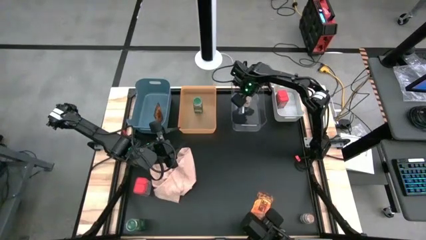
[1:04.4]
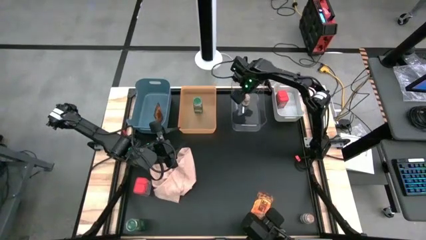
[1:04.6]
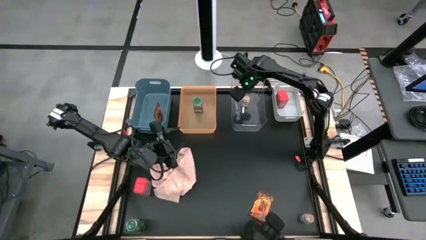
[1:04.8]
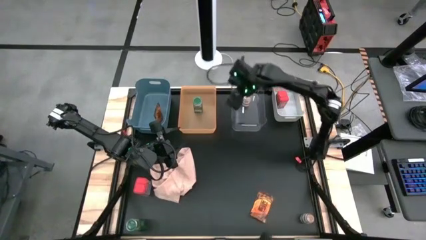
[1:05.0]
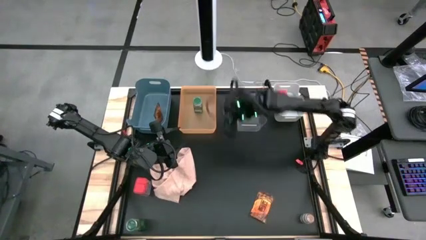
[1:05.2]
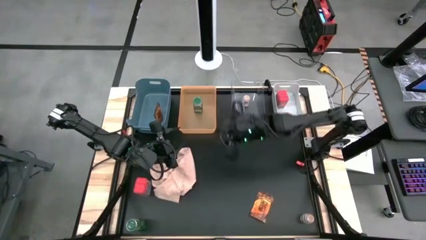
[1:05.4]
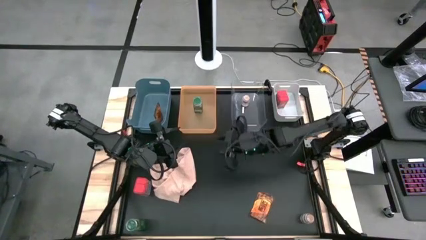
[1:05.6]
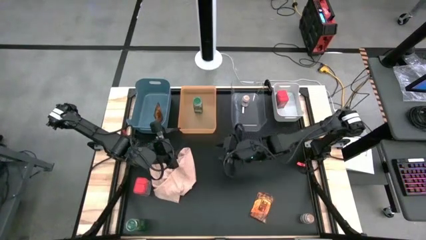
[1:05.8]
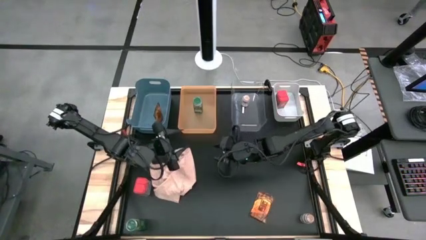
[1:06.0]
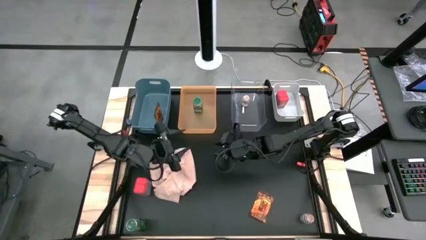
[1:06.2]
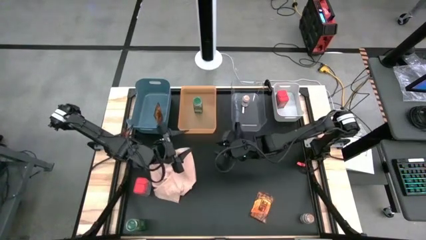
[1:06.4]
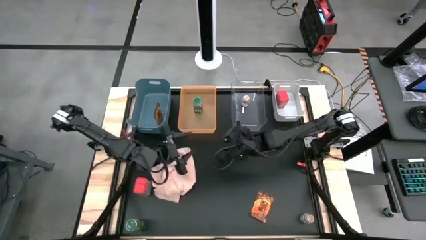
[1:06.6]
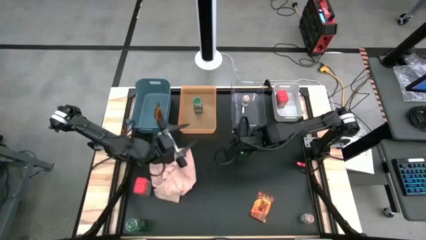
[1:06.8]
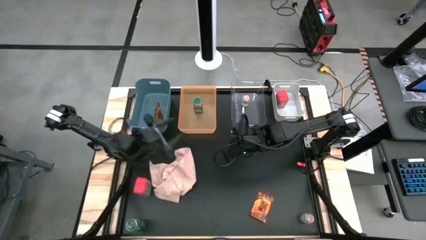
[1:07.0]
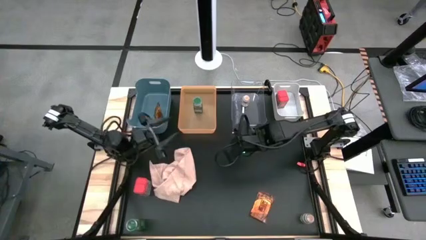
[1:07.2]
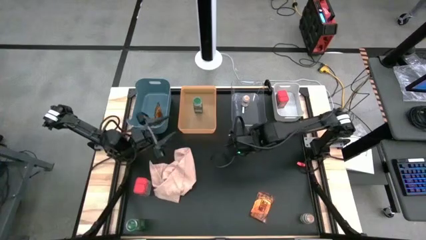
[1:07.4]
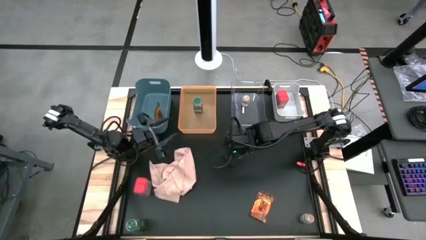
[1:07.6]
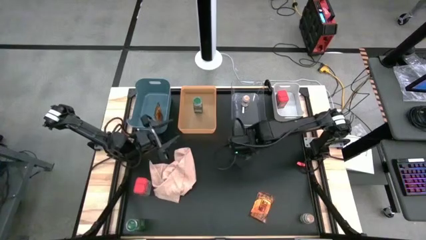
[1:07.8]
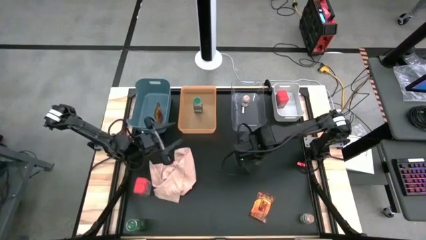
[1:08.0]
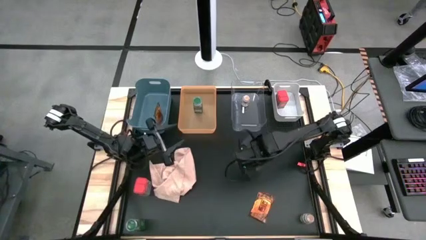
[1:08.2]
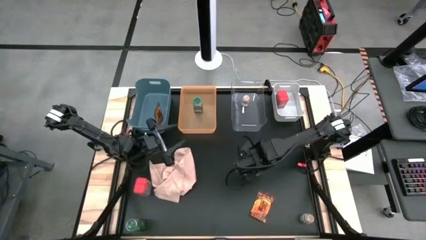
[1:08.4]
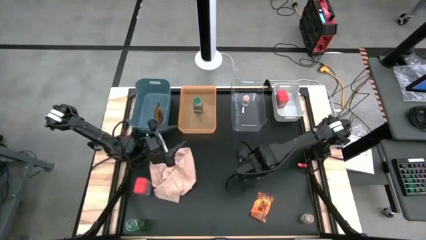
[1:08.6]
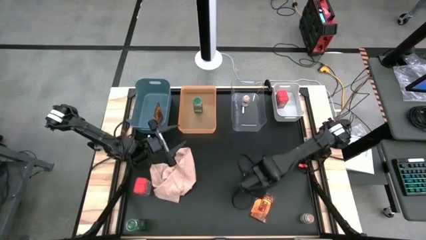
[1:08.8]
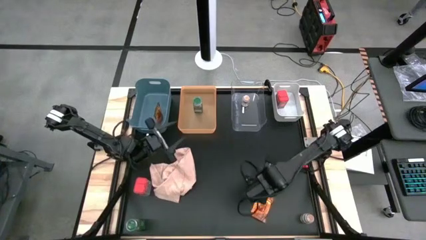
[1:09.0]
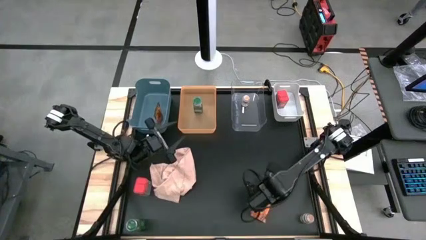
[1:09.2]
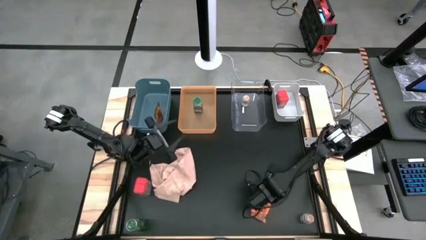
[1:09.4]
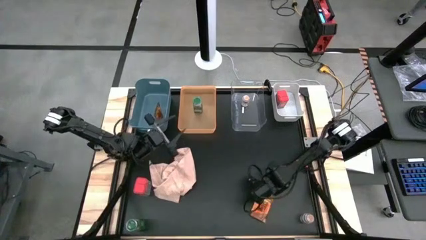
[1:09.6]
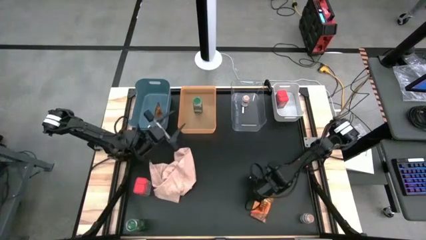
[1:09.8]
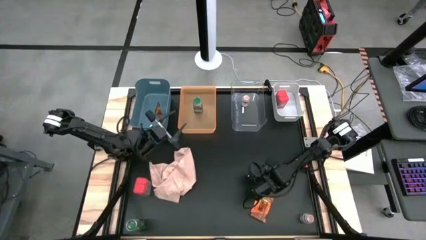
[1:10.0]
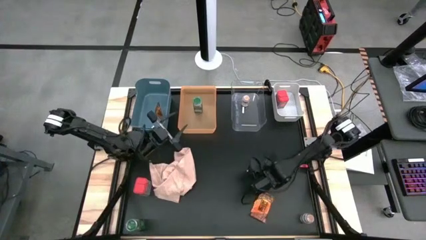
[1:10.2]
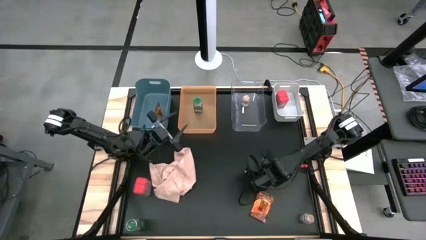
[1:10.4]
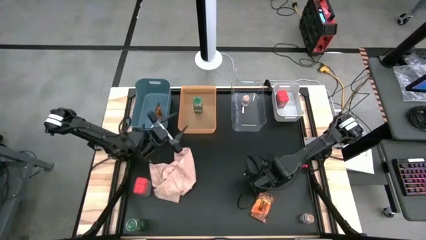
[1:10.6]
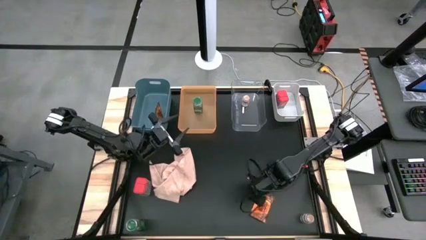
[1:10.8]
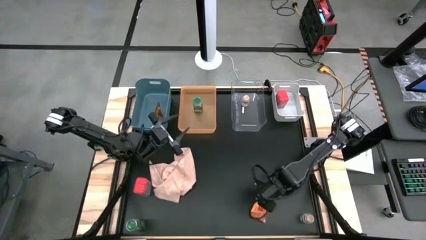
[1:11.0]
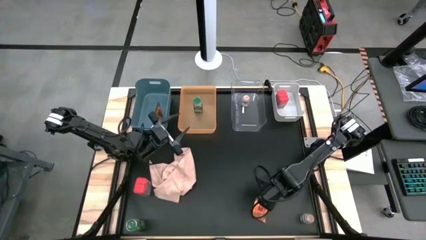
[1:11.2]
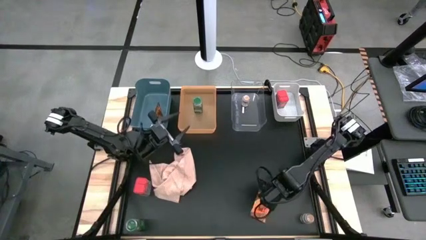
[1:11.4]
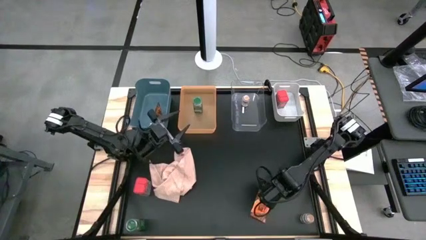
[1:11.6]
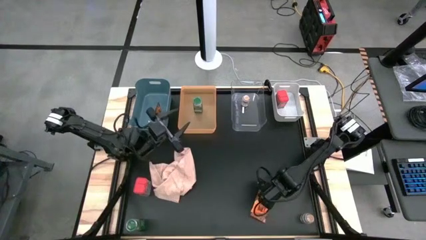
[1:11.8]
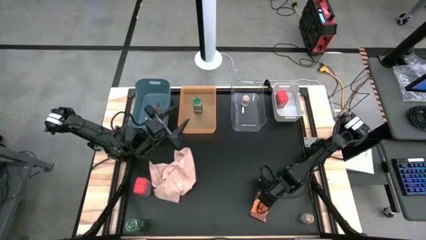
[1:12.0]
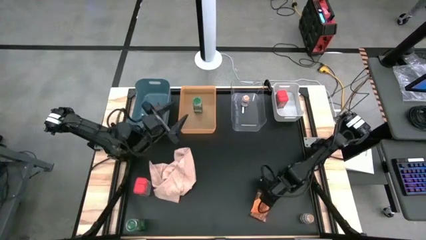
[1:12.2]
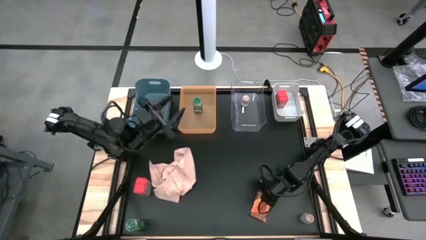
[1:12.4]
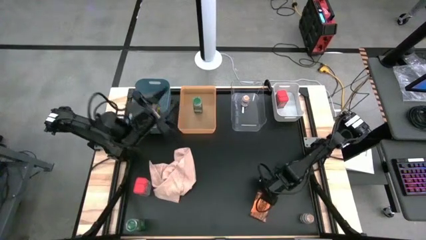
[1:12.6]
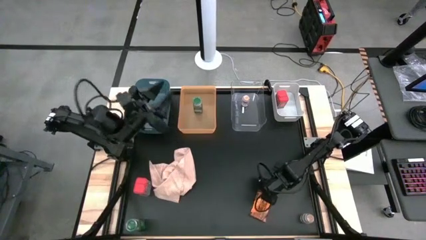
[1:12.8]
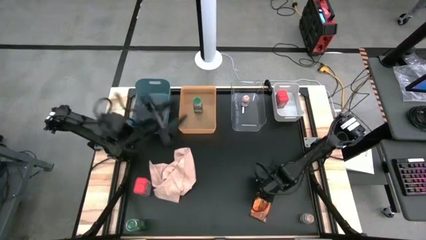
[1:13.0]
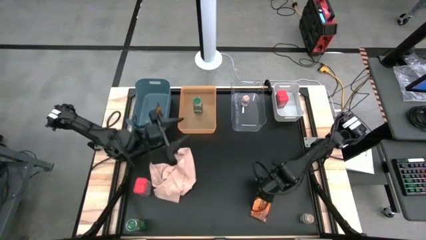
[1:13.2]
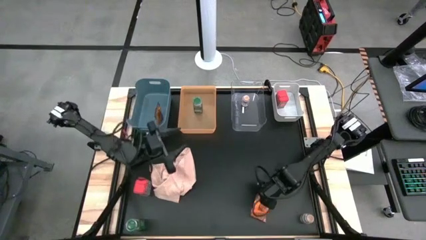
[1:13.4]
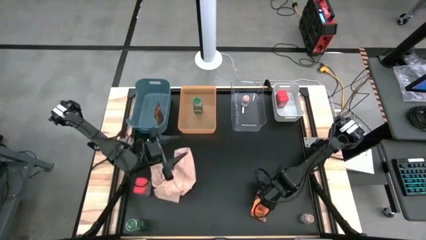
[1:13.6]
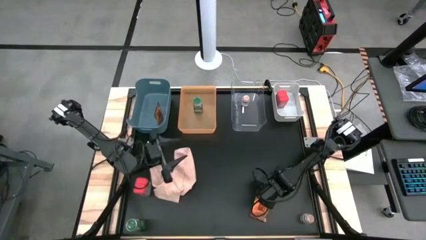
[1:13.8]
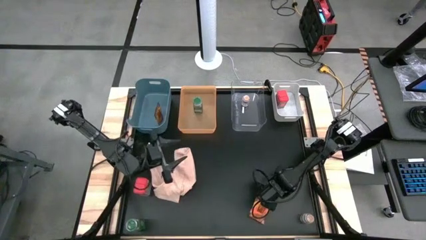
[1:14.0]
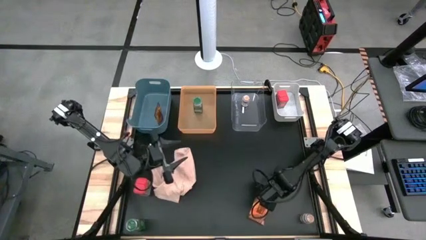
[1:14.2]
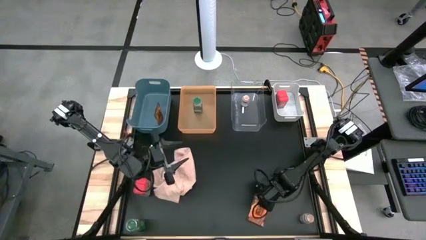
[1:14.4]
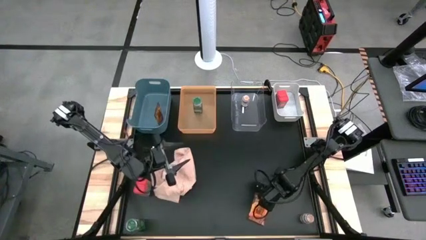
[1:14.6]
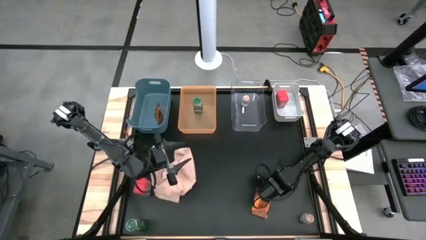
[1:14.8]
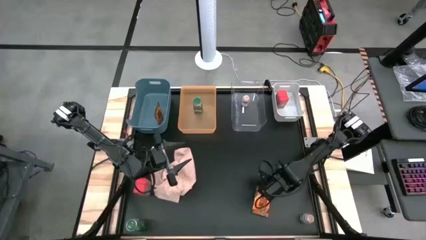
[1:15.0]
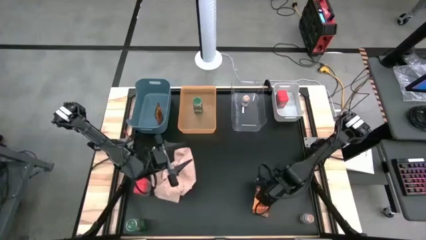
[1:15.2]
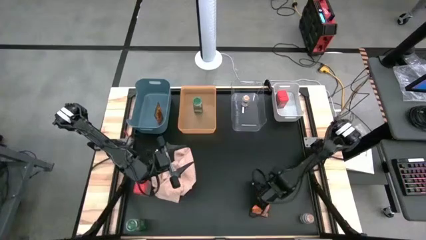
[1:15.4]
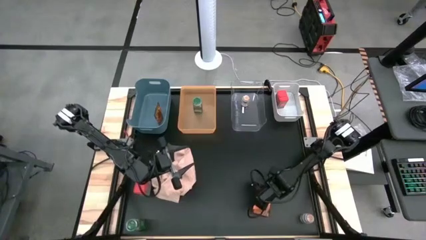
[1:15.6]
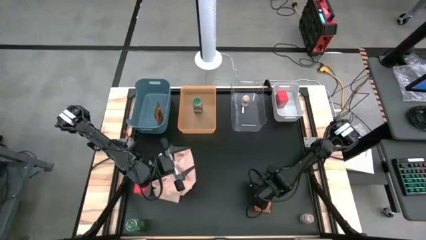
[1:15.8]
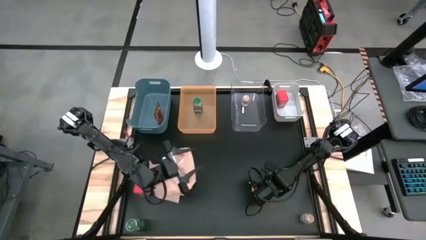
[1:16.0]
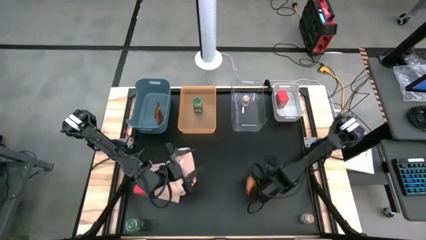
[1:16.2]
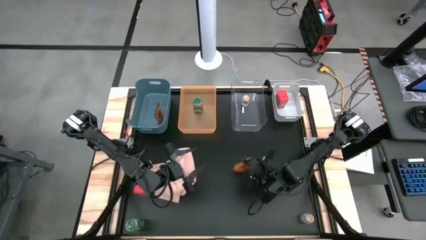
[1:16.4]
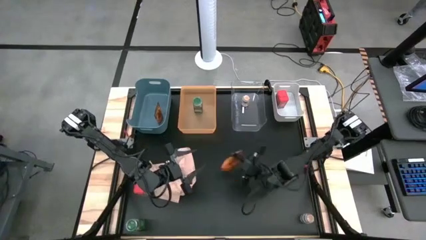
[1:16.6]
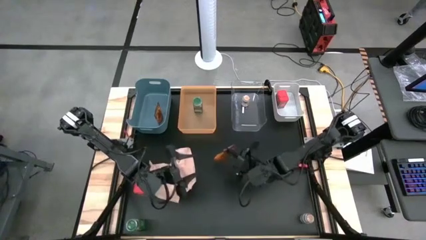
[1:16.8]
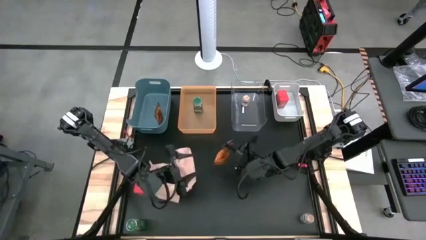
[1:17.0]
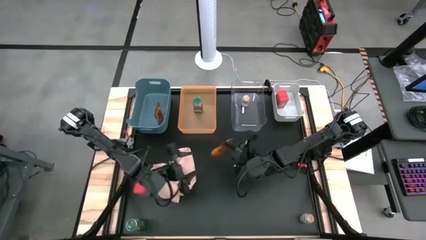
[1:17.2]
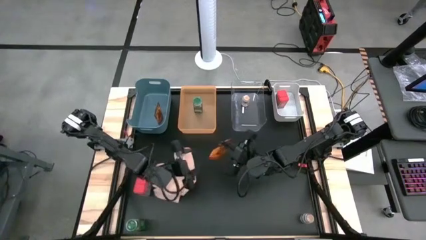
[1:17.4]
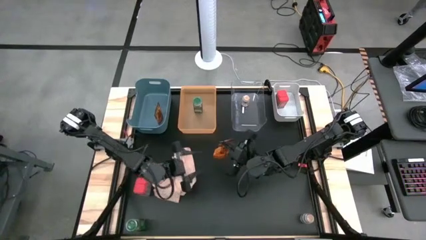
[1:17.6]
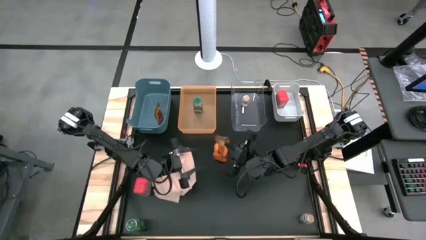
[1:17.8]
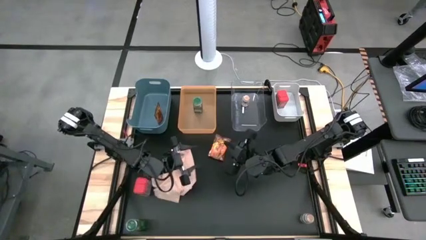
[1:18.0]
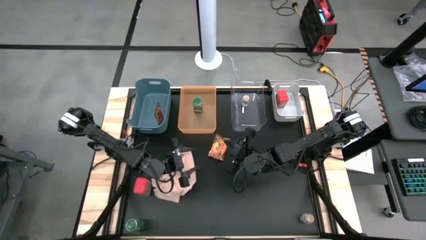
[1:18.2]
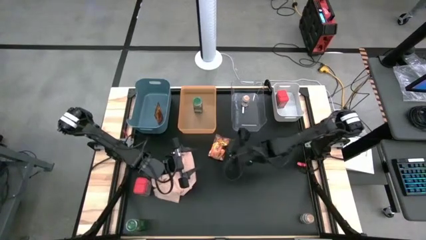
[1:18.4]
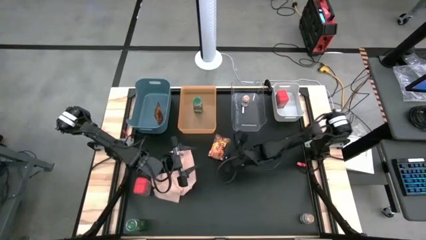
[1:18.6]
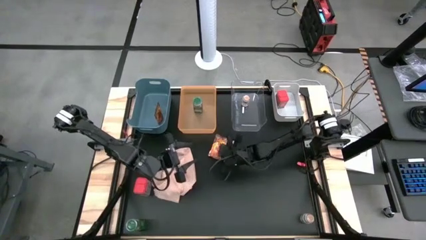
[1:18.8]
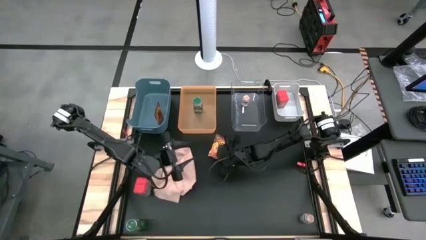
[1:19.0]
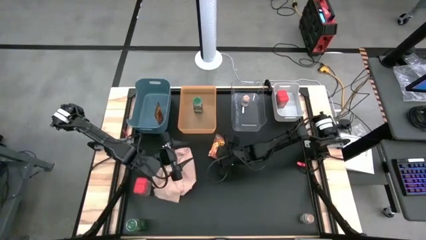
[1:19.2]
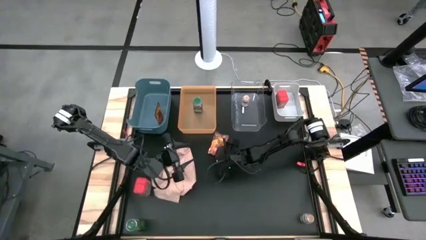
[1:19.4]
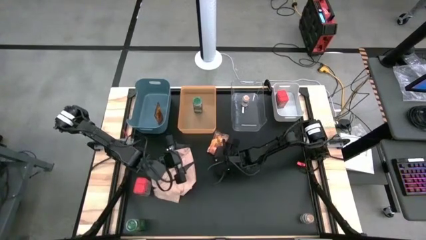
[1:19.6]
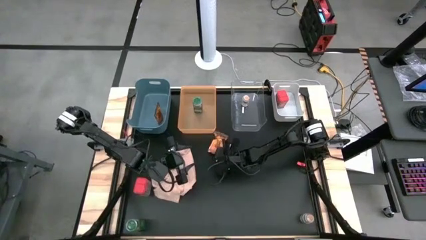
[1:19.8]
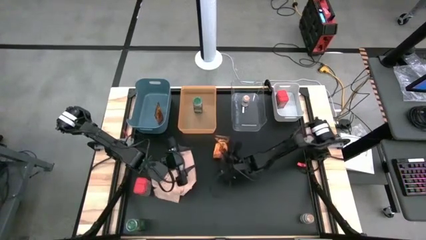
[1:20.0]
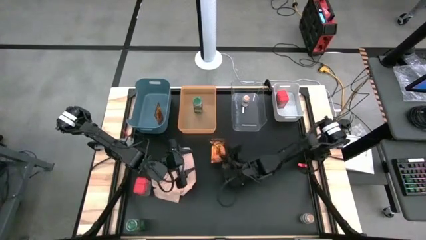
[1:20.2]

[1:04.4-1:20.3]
Task: Sort spices by type
Put the orange seasoning pack into the blue bin
